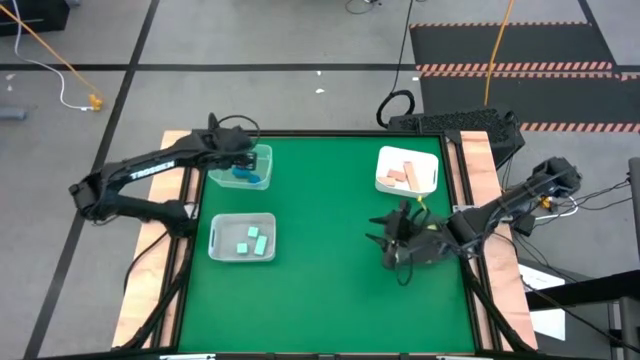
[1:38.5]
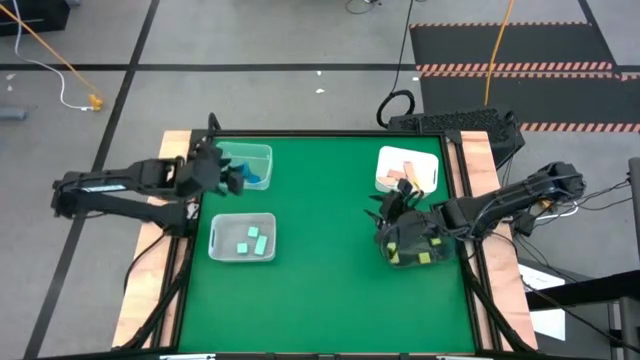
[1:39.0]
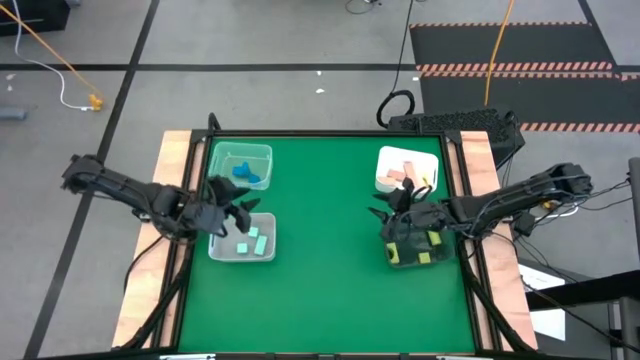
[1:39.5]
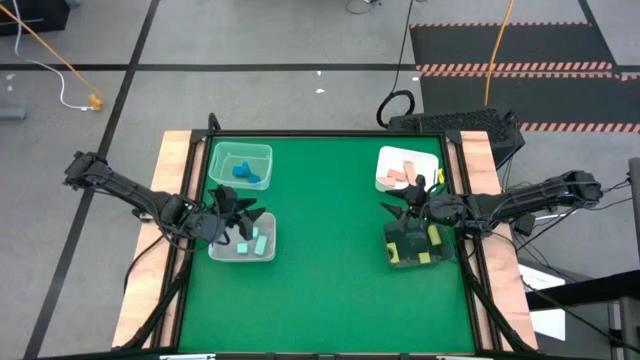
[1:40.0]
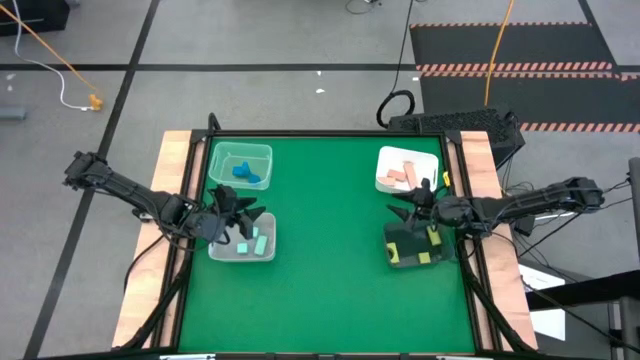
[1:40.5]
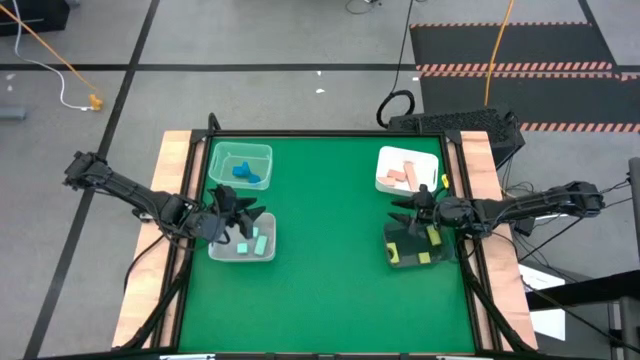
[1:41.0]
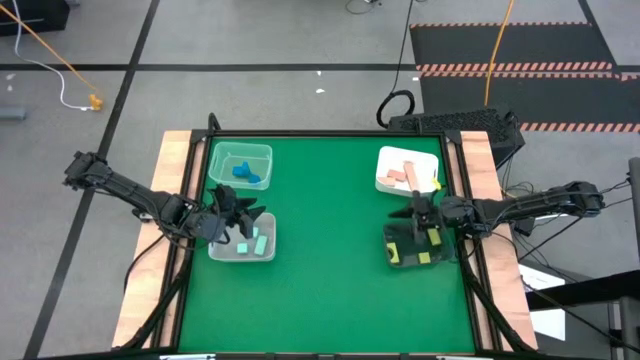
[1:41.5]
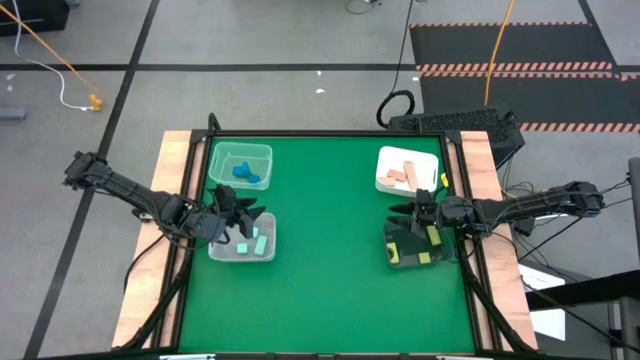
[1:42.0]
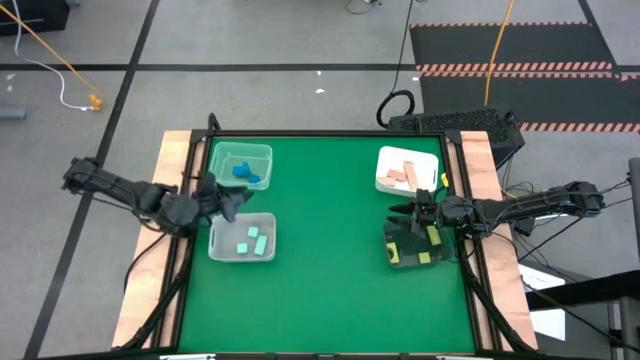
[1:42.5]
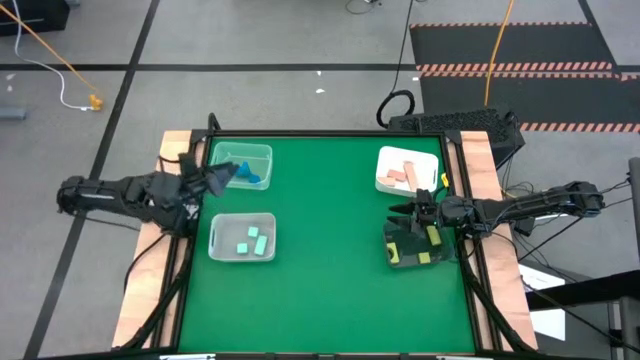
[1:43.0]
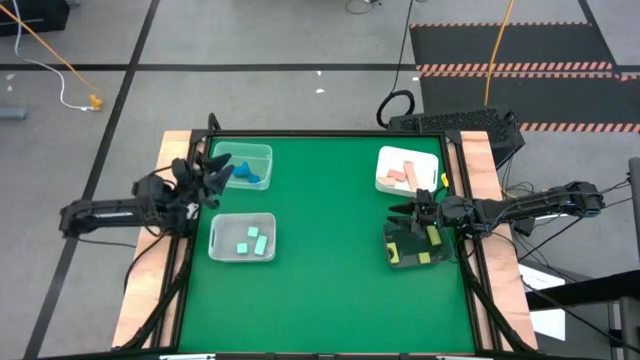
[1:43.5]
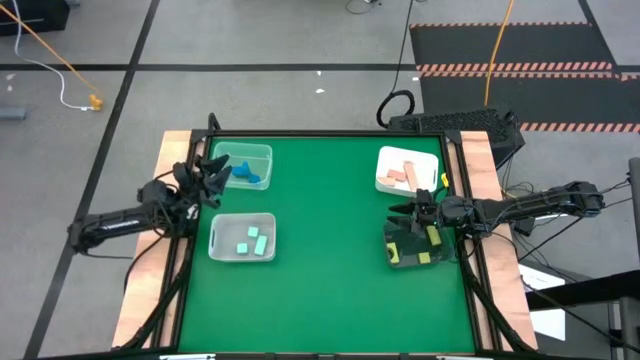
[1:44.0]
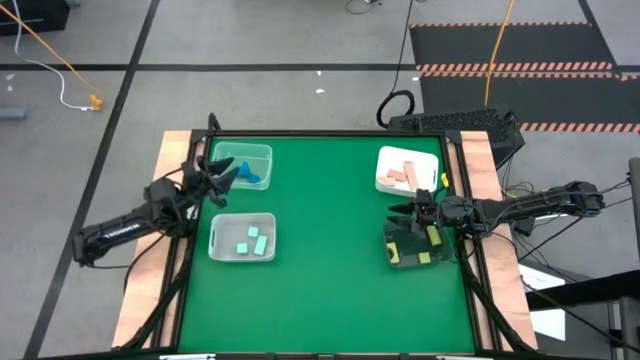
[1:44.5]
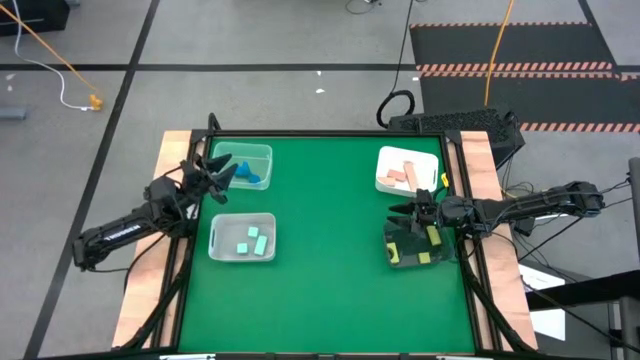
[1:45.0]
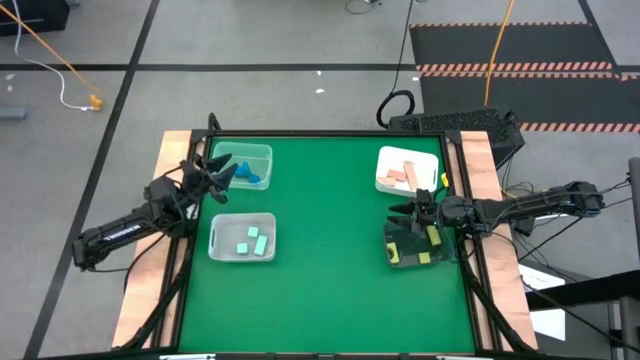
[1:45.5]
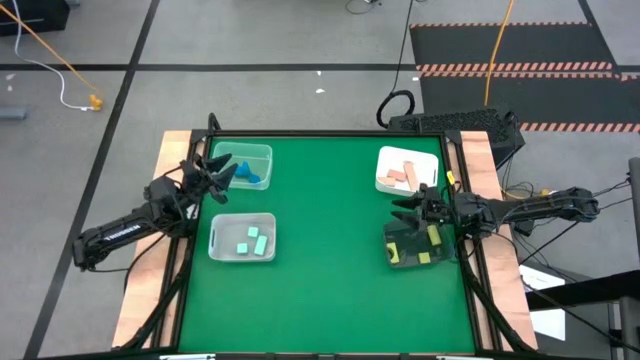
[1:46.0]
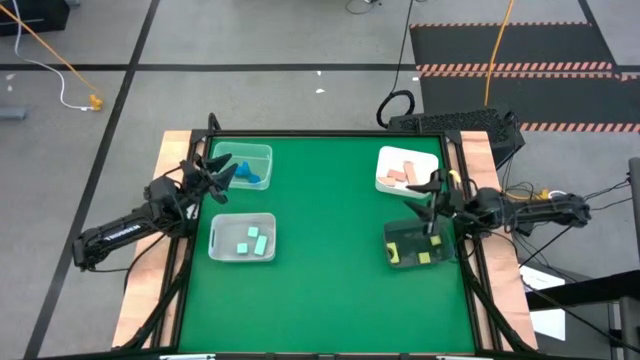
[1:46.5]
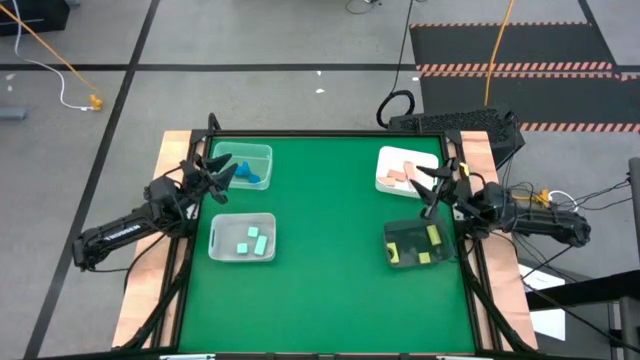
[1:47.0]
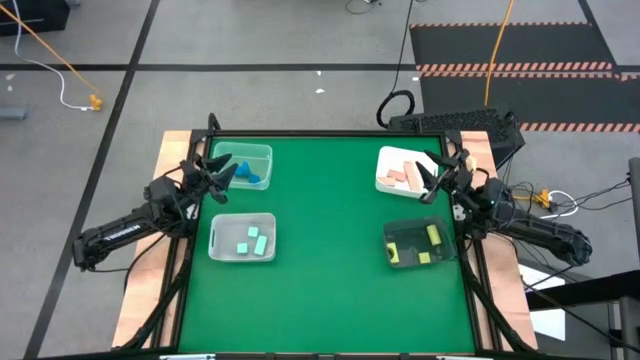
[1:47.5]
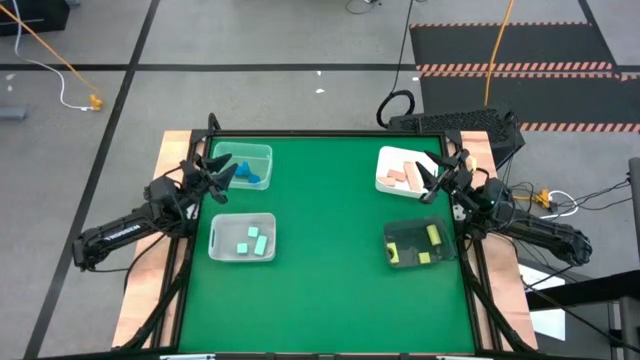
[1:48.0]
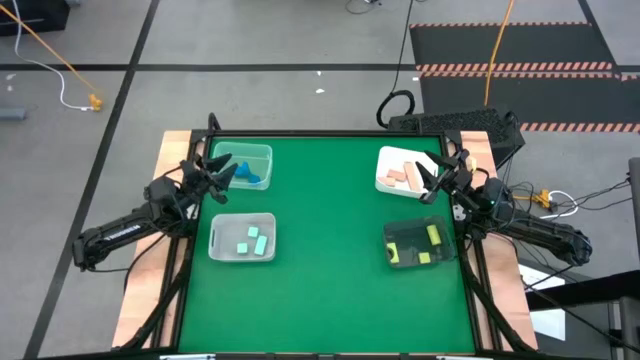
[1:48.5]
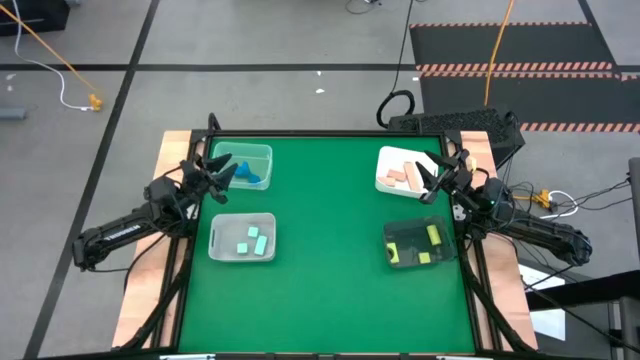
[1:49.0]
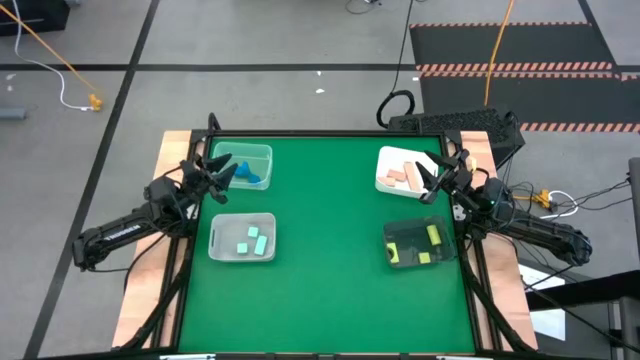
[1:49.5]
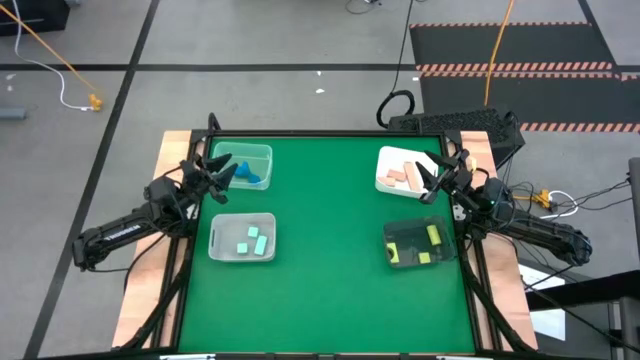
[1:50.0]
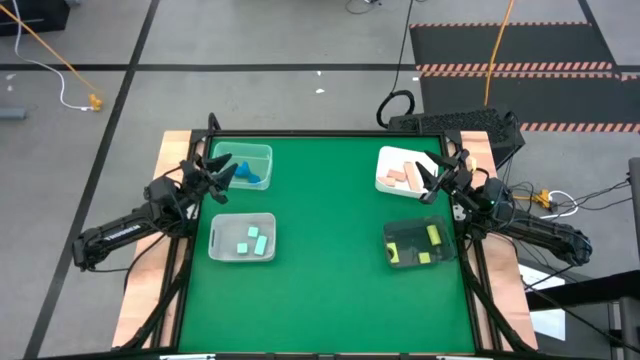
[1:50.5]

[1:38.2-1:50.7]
Task: Sort & place blocks by color
Return to Home Position

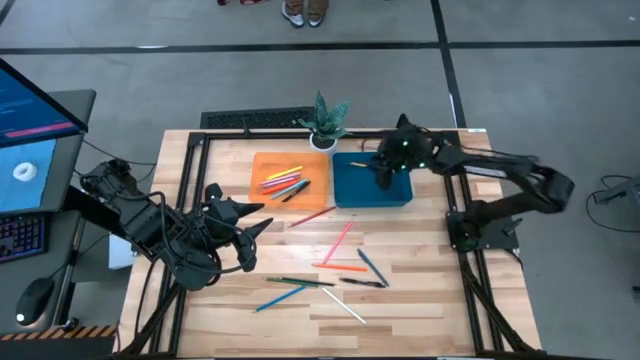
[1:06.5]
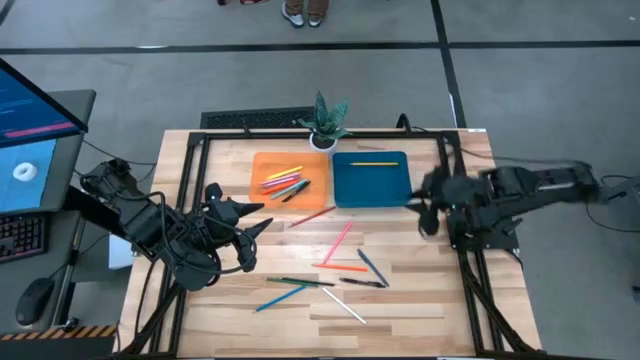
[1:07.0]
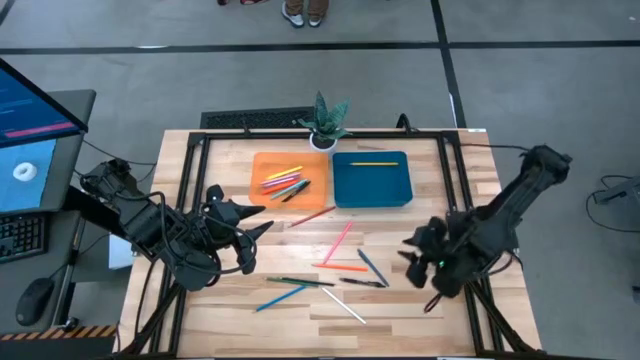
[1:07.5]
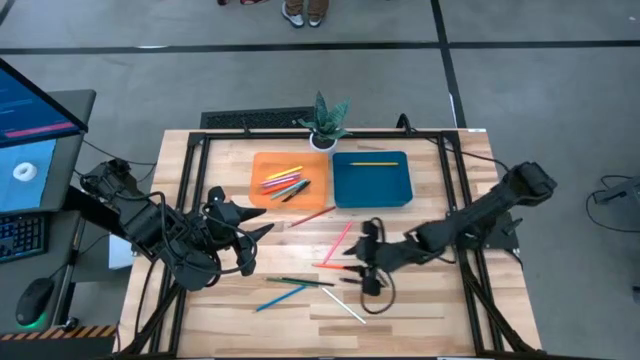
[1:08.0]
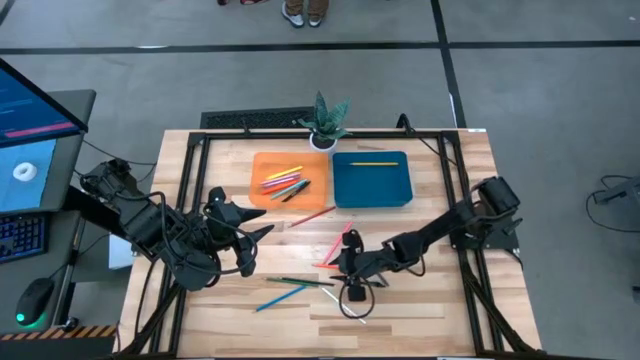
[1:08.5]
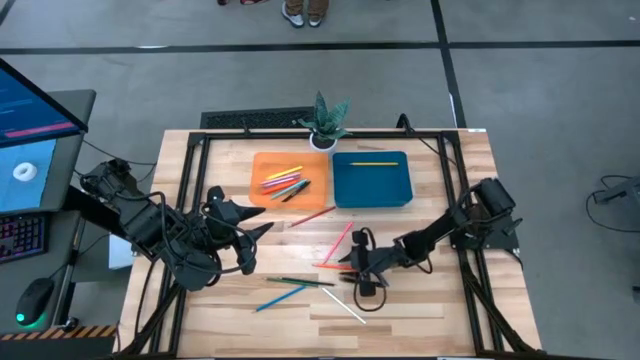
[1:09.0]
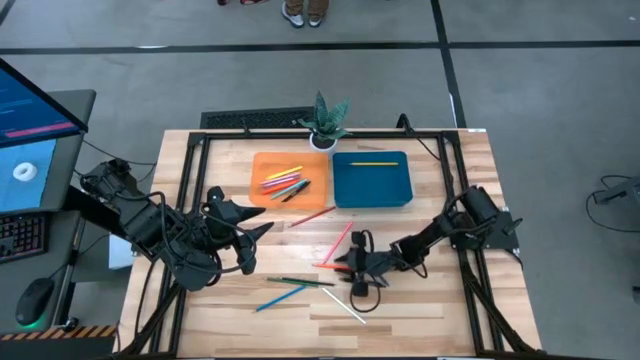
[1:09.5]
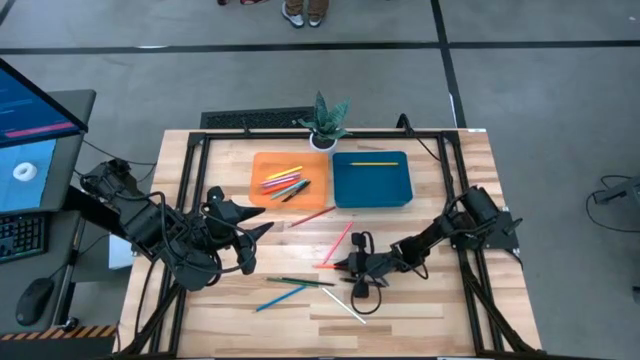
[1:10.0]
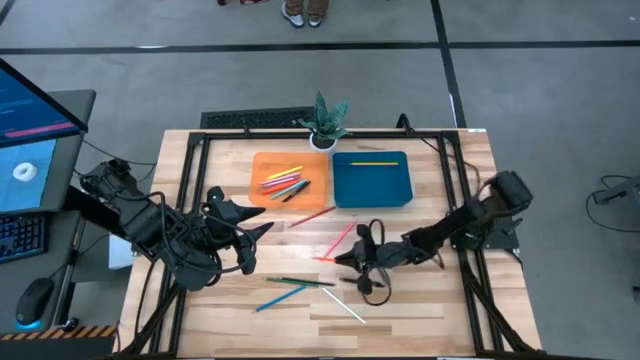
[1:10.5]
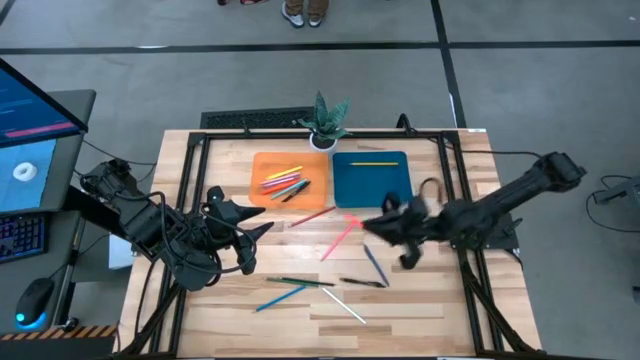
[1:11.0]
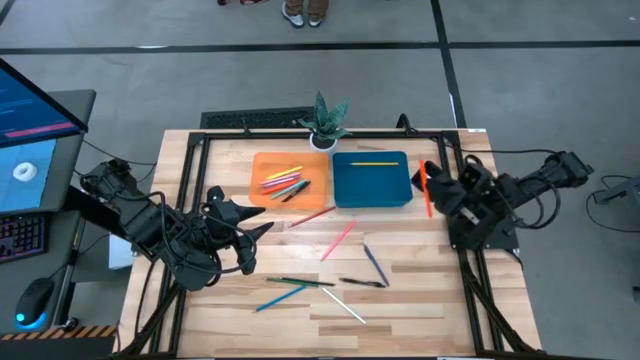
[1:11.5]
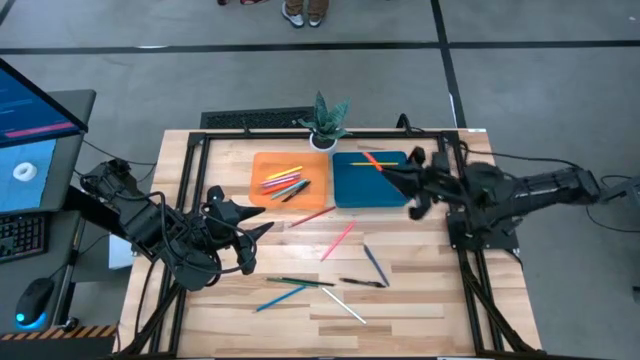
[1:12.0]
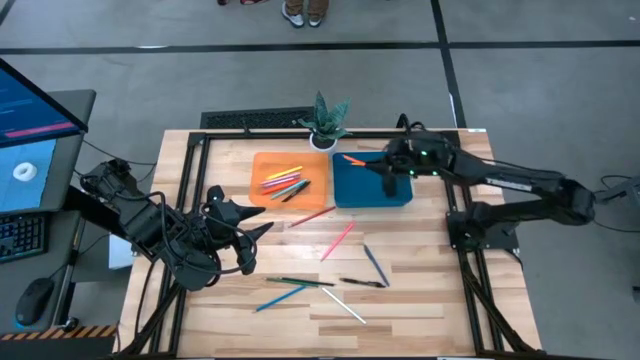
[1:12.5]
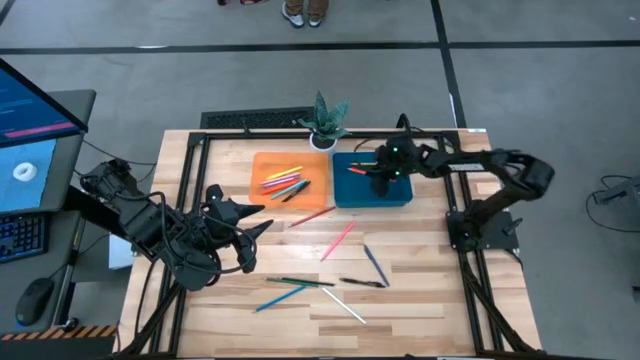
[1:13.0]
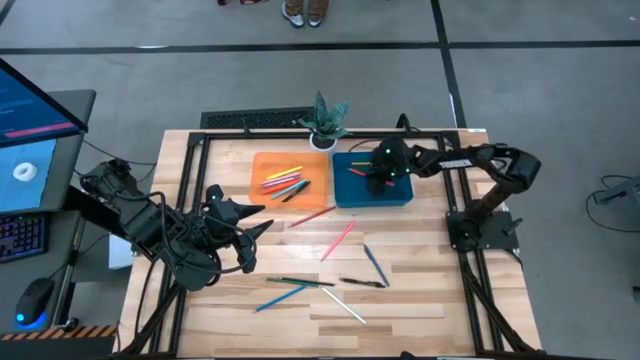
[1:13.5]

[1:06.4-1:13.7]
Task: Sort pens & pencils
Put the orange pencil into the blue bin
